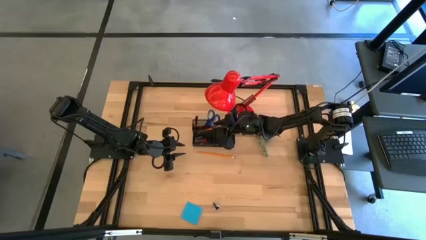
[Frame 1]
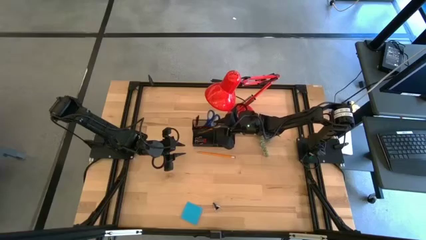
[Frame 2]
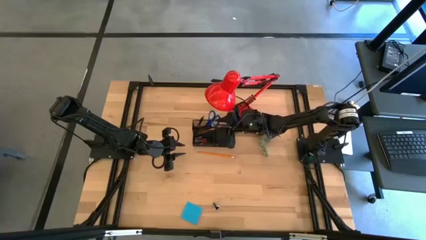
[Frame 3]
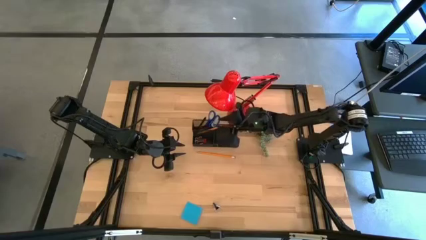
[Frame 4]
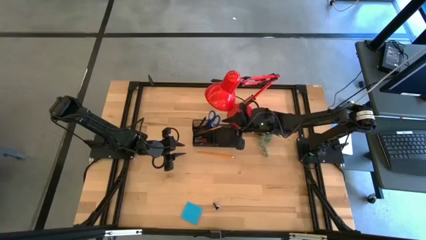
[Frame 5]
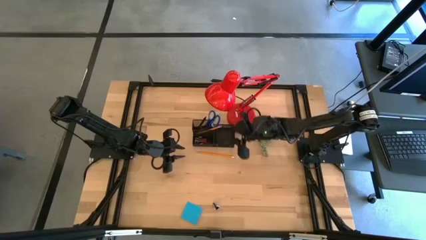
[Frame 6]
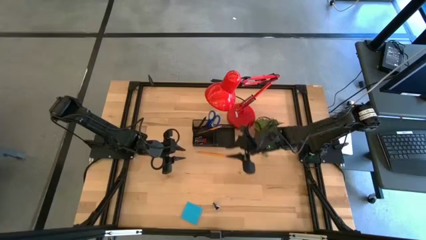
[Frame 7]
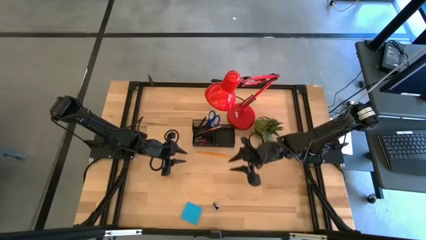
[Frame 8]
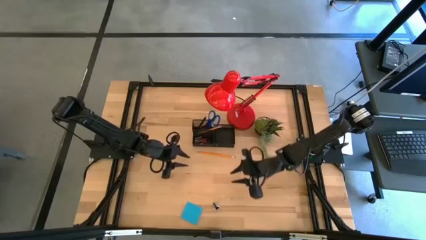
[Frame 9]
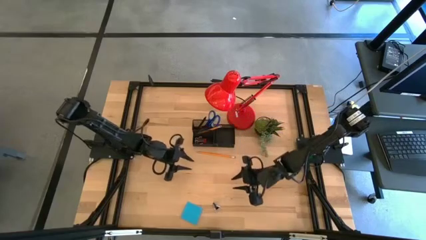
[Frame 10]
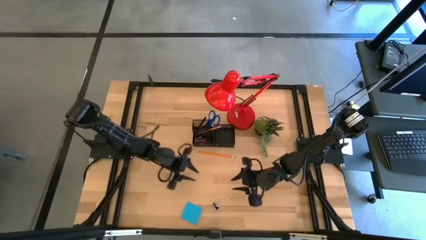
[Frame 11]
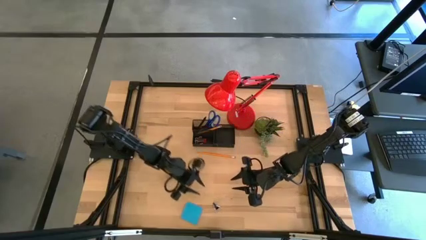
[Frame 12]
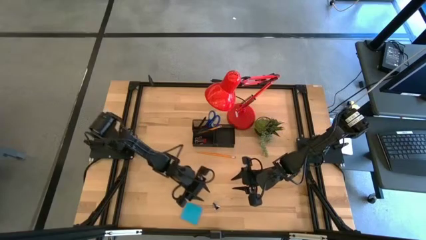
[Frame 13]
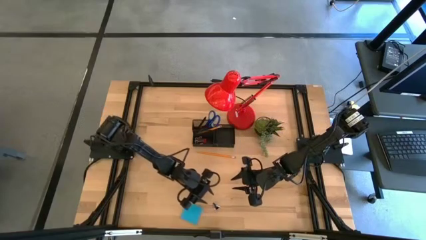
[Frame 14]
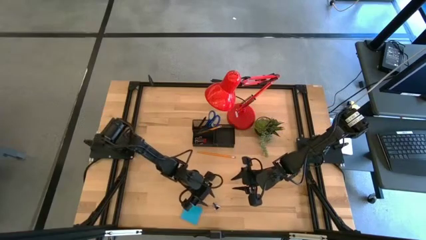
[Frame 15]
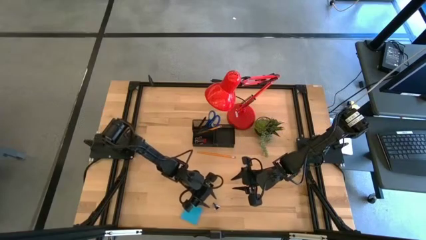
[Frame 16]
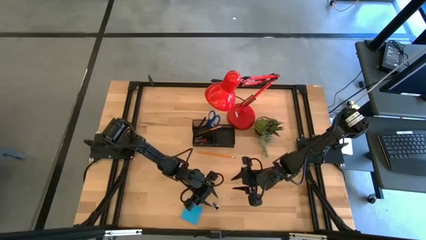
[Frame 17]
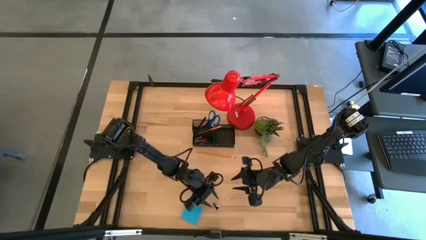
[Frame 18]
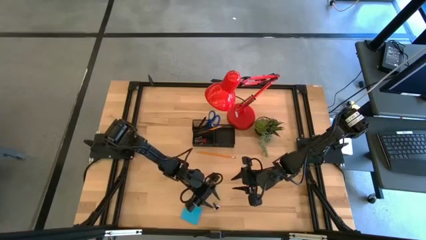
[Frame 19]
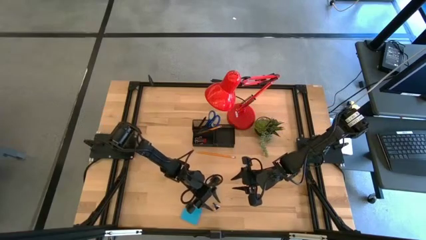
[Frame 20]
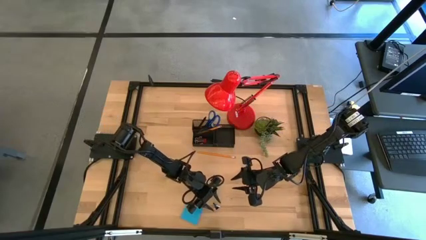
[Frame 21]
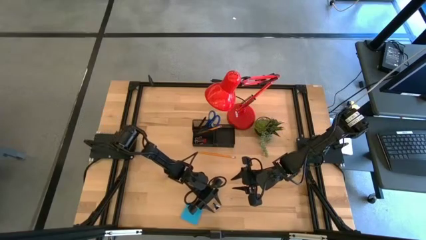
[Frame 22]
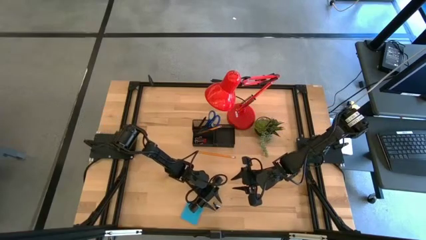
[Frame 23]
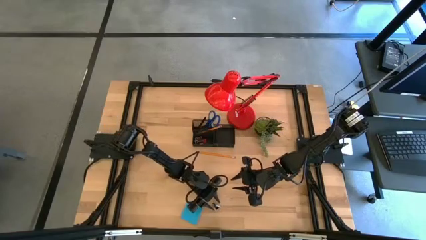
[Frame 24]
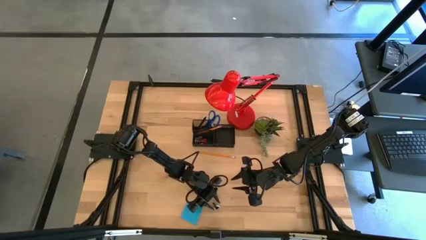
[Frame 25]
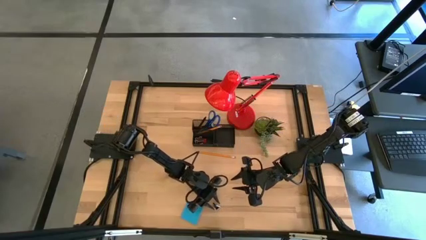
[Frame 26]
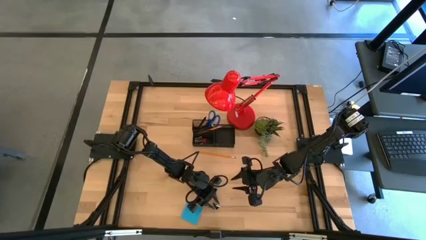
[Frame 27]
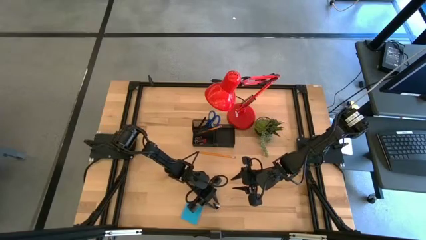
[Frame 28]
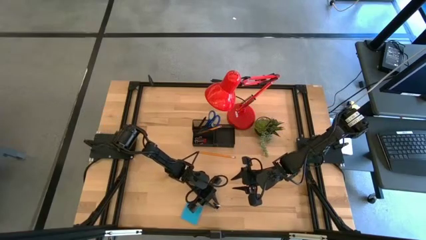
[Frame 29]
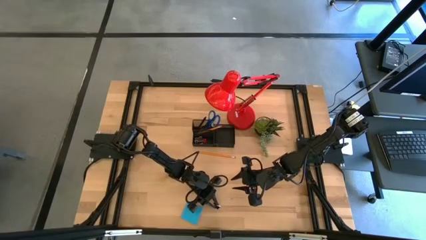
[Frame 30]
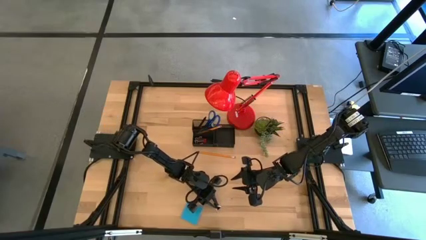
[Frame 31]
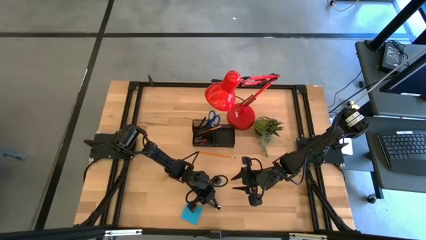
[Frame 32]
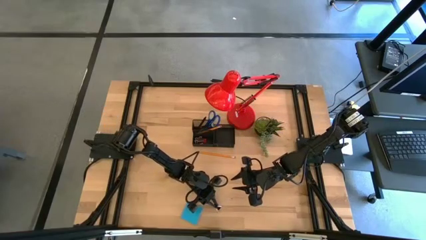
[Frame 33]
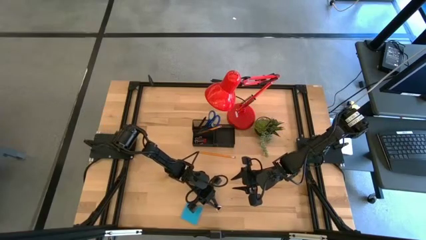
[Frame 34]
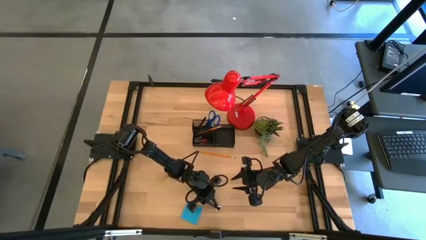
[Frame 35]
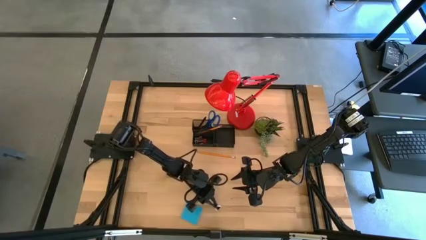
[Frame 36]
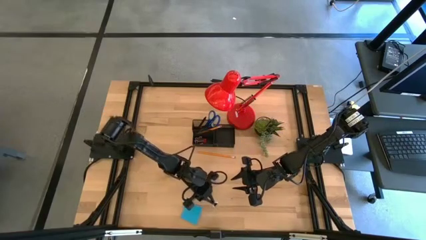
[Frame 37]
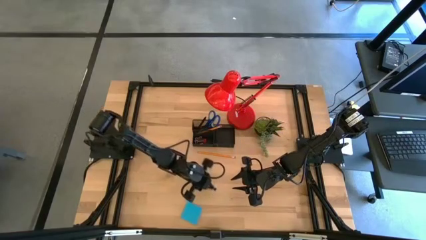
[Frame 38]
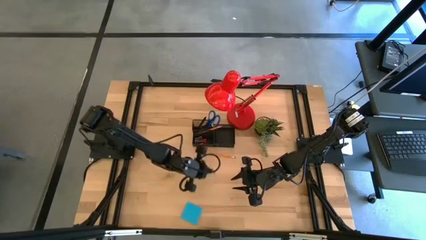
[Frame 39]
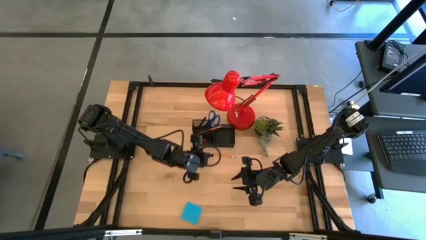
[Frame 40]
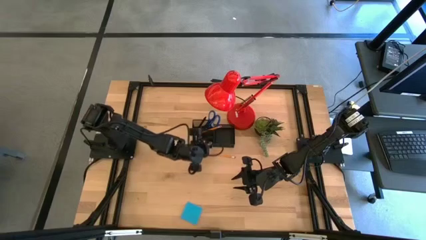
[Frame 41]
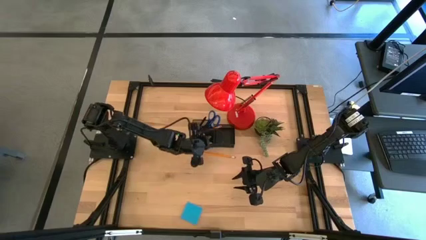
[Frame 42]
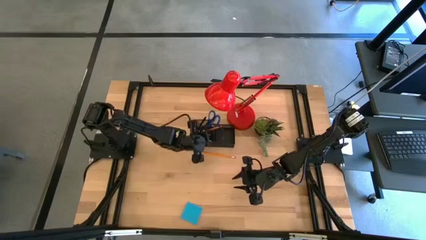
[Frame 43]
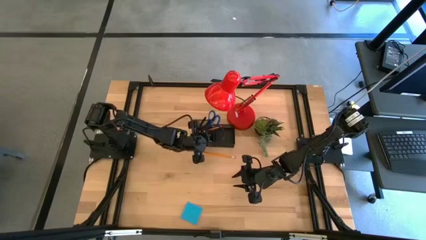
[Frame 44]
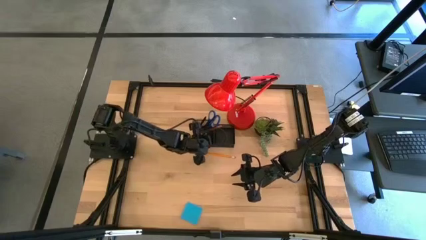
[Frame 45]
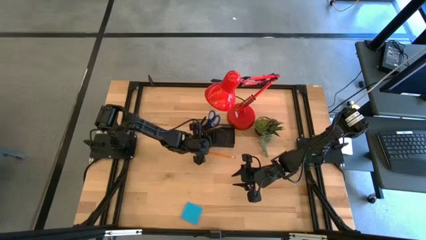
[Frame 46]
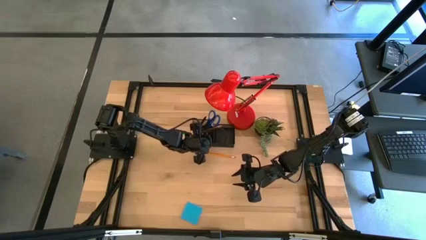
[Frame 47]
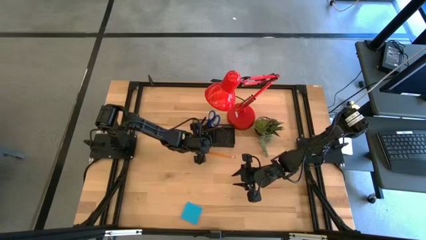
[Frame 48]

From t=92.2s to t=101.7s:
Task: Pick and place office supplies into organizer
Put the black binder clip into the black desk organizer

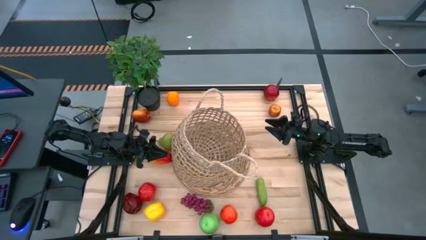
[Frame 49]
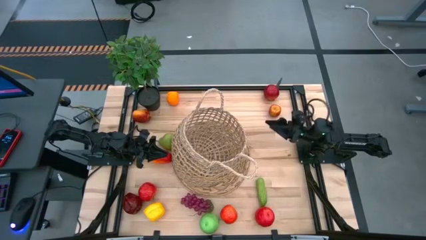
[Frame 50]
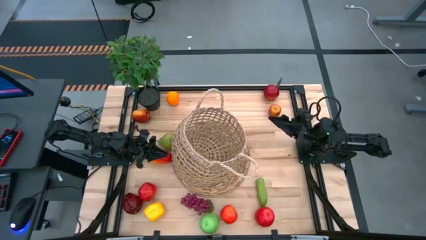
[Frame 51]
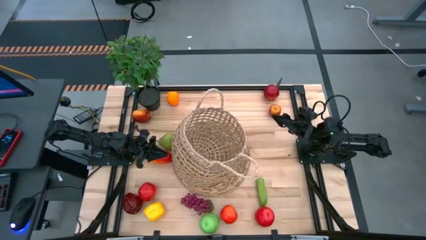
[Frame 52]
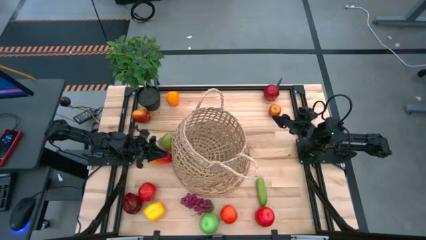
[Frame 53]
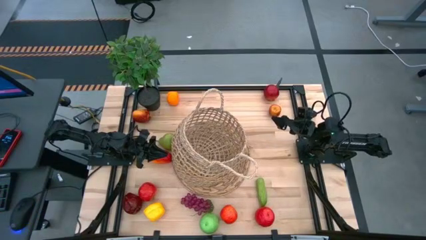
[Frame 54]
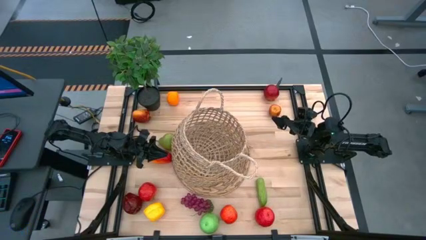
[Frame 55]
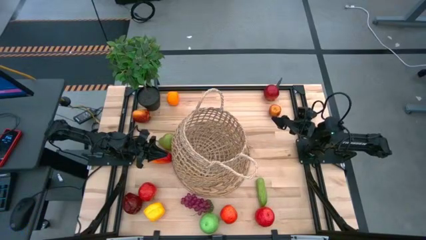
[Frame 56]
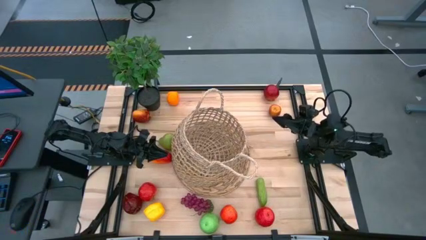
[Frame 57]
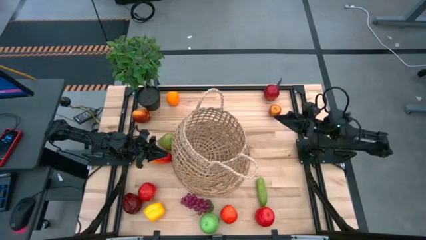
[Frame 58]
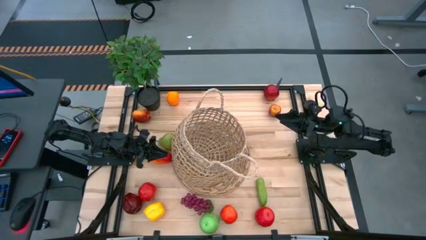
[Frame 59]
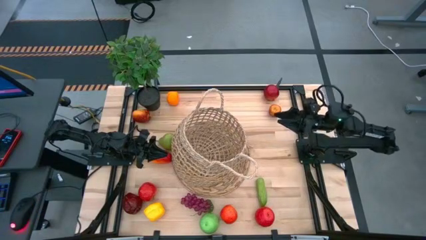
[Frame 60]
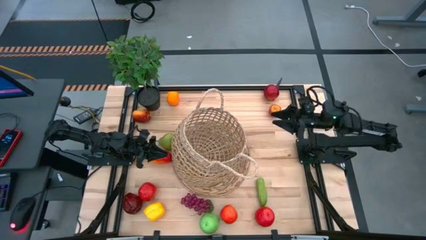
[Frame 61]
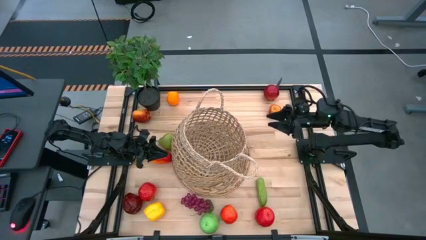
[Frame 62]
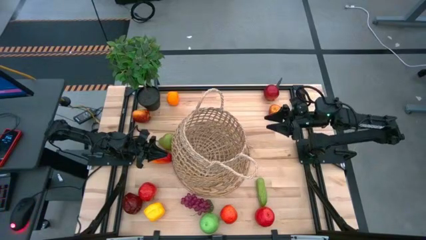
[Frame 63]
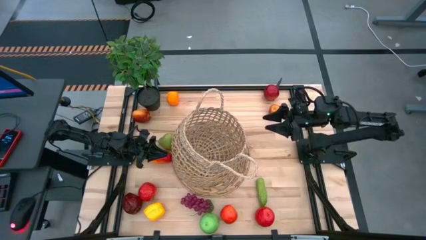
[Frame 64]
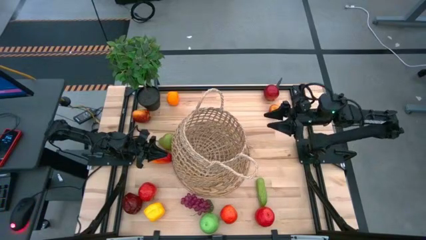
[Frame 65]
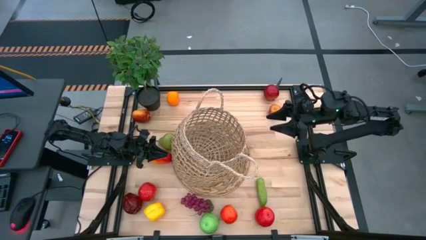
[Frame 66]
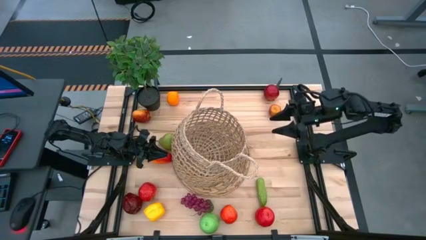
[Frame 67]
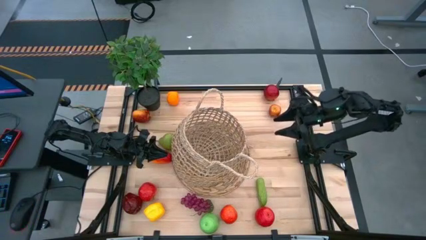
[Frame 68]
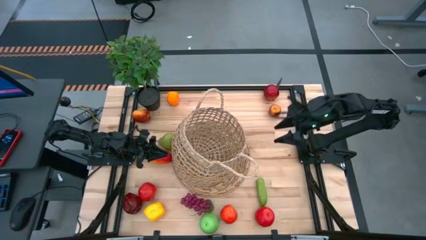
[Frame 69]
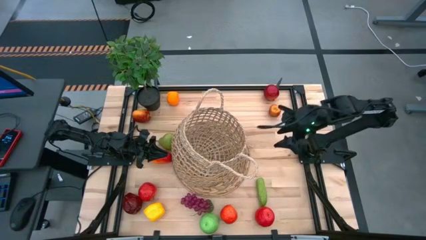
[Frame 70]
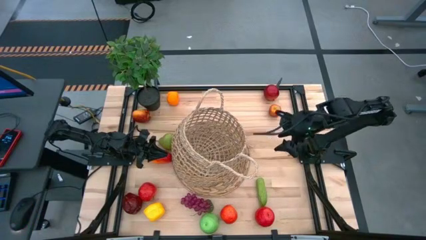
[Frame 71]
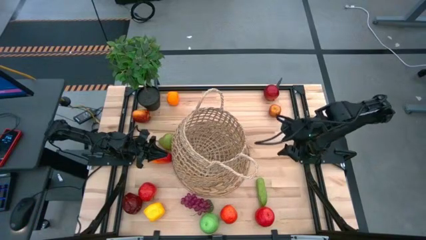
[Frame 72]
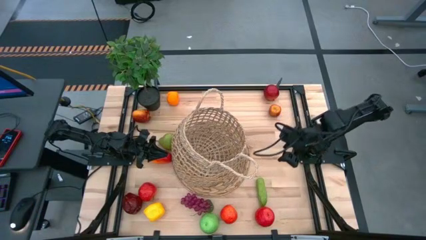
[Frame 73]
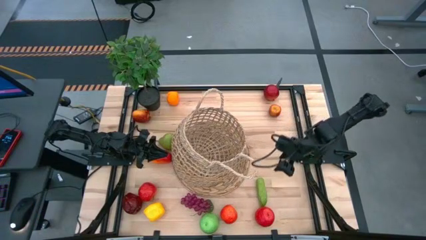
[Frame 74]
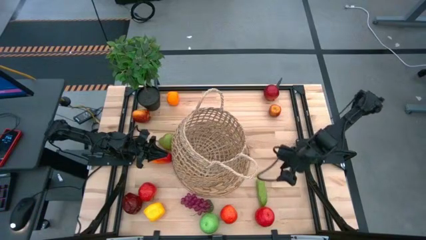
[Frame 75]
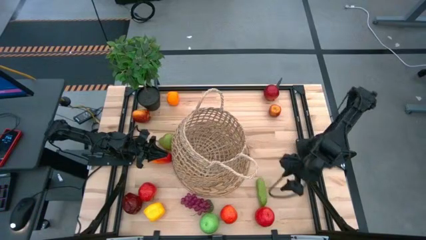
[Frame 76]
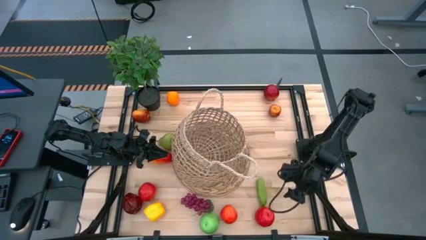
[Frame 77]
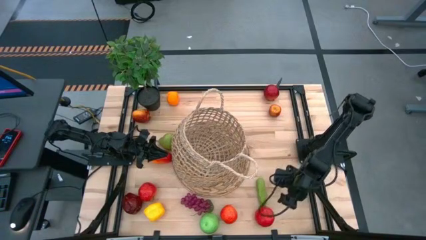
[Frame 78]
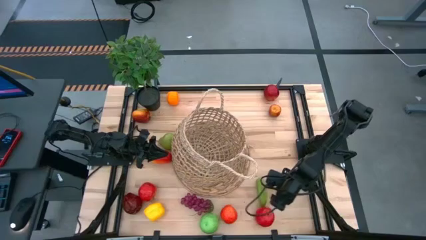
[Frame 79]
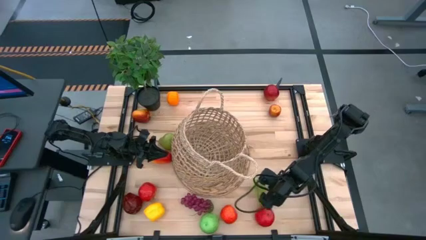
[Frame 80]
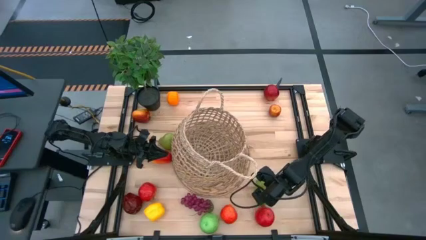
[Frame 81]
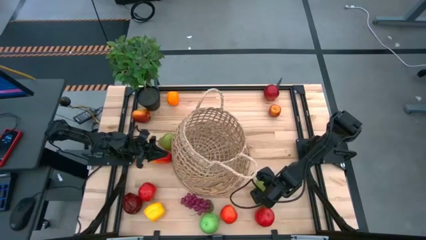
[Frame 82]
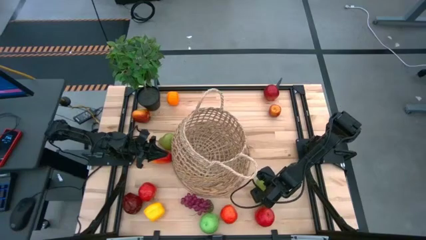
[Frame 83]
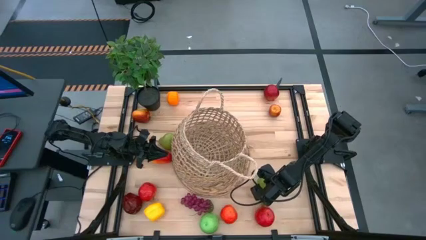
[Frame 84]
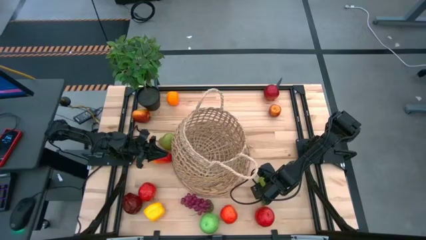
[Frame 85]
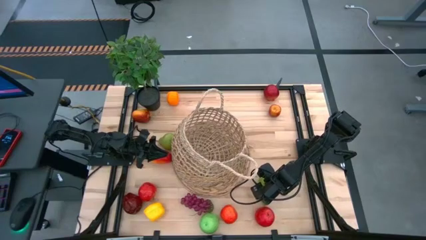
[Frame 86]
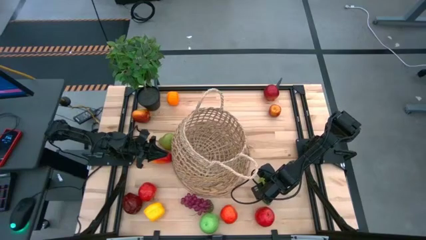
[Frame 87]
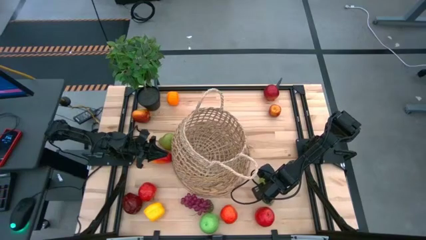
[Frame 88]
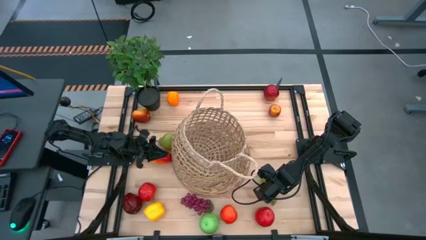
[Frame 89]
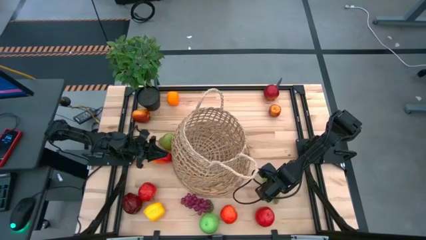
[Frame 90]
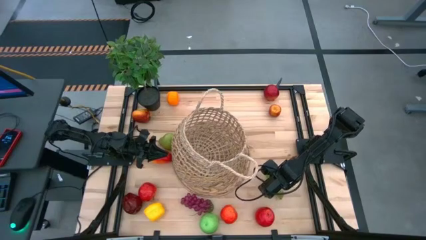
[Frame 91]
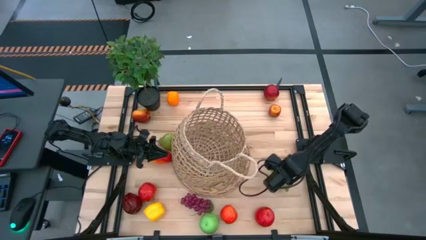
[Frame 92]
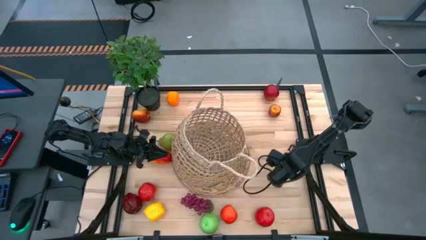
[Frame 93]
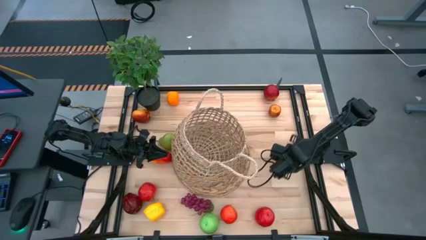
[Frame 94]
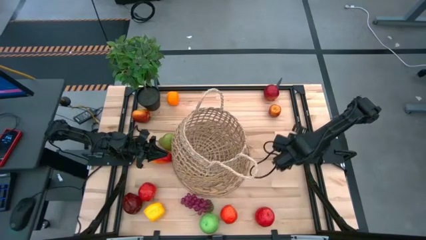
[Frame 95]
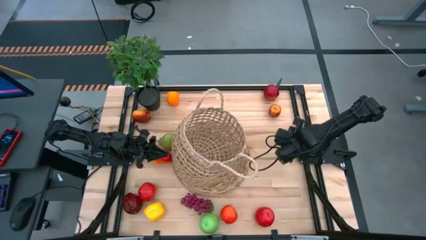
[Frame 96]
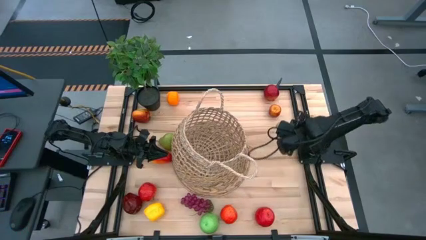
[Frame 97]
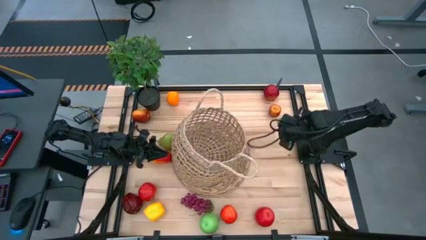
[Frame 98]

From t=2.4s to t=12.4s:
Task: Build produce basket
Put the cucumber into the basket
